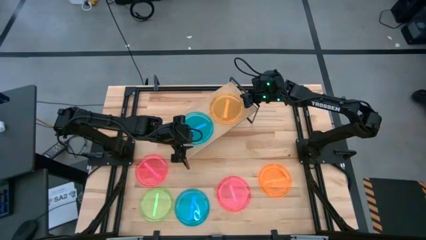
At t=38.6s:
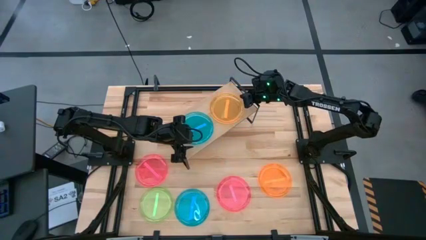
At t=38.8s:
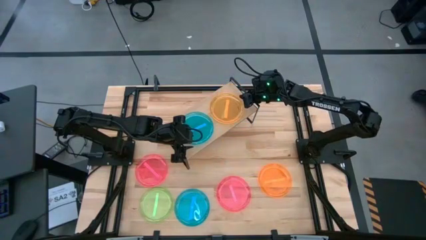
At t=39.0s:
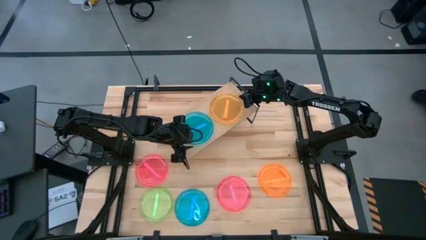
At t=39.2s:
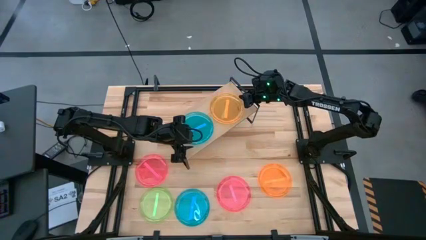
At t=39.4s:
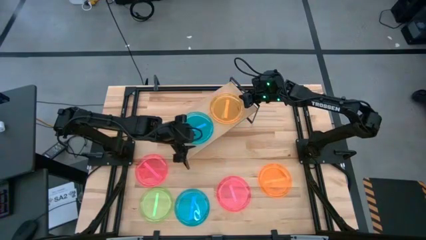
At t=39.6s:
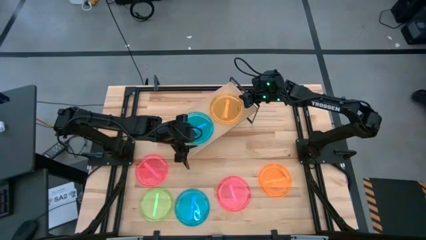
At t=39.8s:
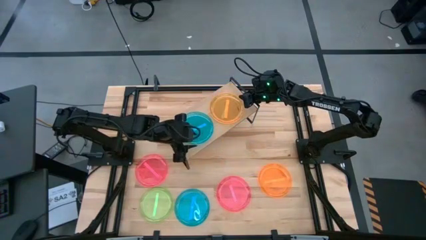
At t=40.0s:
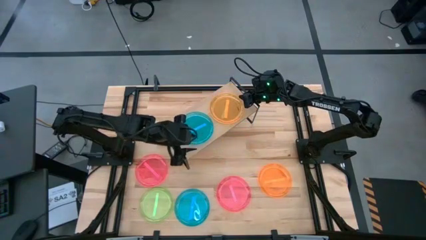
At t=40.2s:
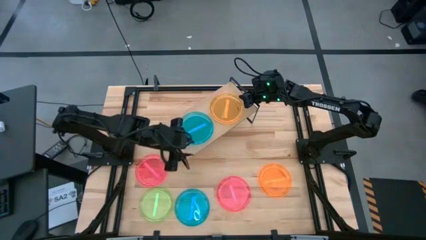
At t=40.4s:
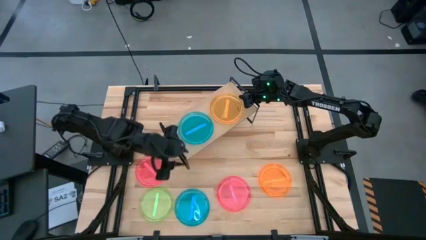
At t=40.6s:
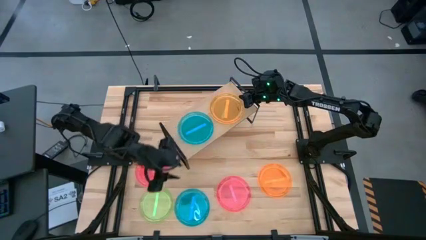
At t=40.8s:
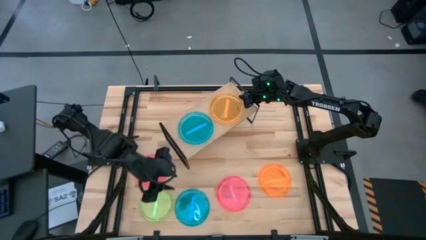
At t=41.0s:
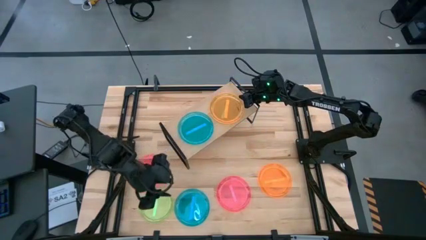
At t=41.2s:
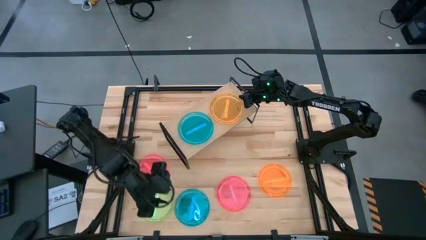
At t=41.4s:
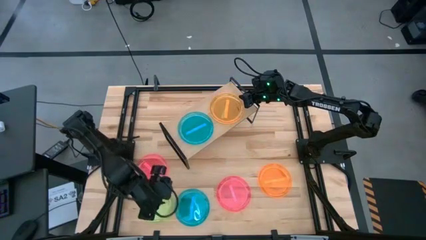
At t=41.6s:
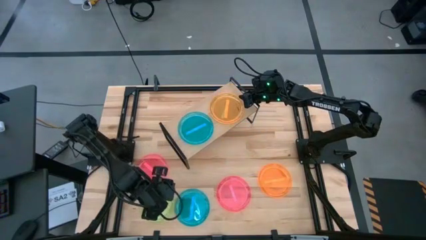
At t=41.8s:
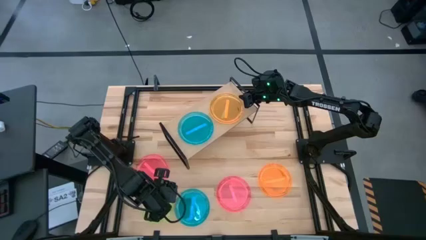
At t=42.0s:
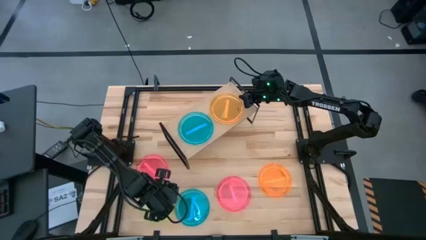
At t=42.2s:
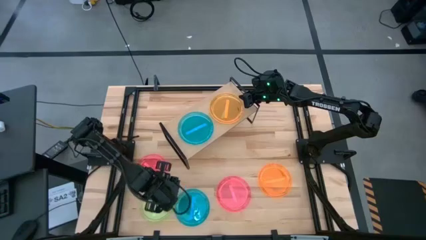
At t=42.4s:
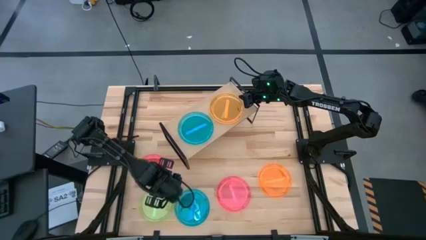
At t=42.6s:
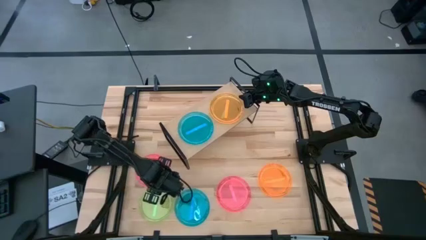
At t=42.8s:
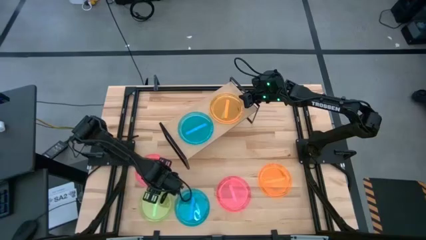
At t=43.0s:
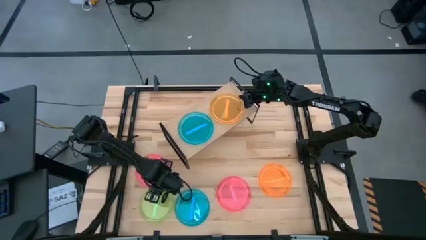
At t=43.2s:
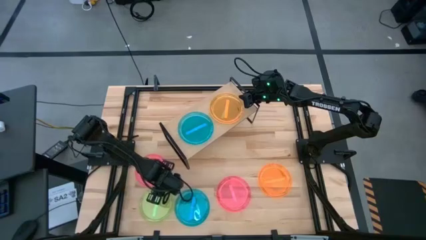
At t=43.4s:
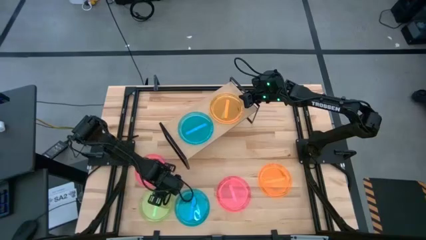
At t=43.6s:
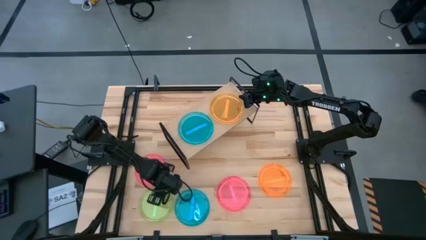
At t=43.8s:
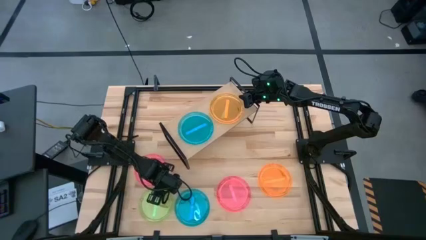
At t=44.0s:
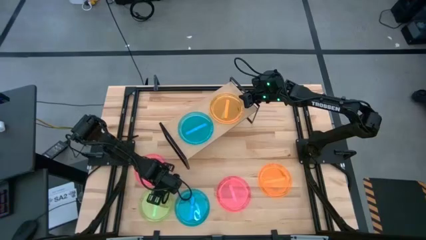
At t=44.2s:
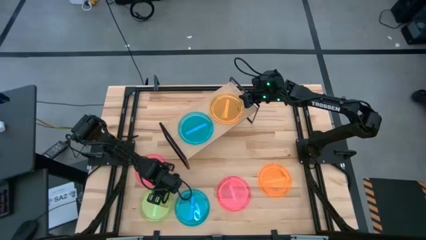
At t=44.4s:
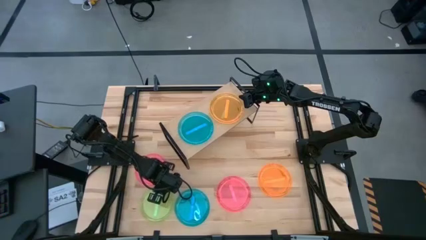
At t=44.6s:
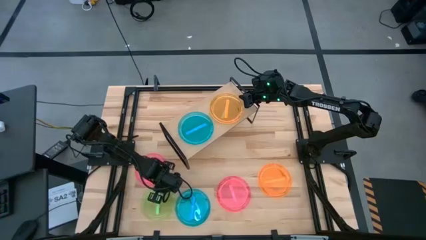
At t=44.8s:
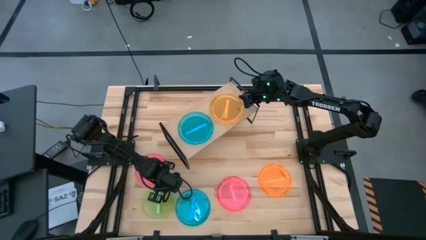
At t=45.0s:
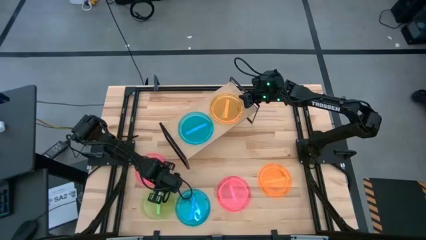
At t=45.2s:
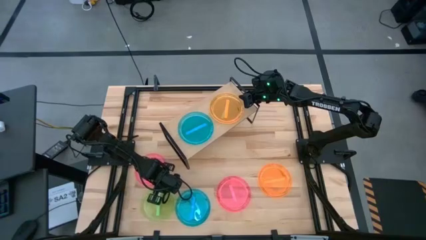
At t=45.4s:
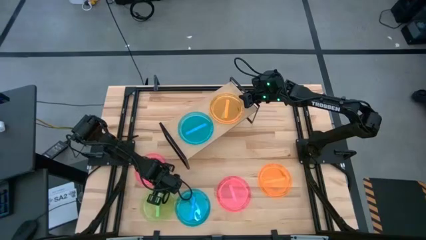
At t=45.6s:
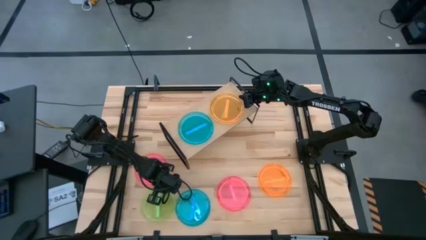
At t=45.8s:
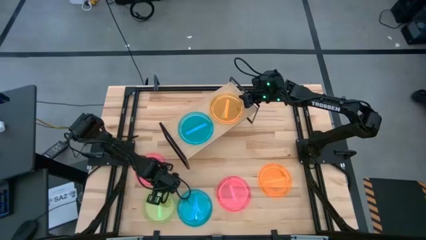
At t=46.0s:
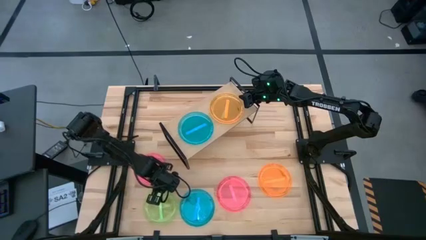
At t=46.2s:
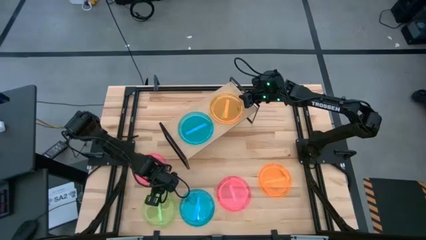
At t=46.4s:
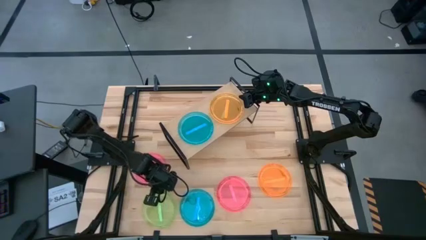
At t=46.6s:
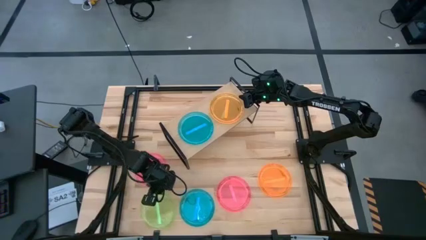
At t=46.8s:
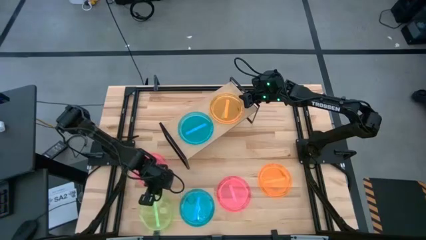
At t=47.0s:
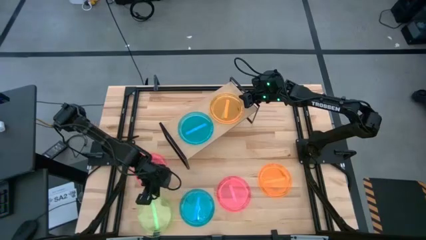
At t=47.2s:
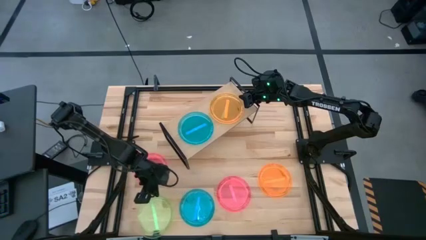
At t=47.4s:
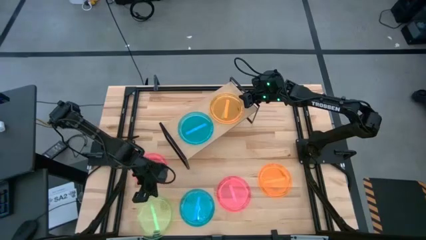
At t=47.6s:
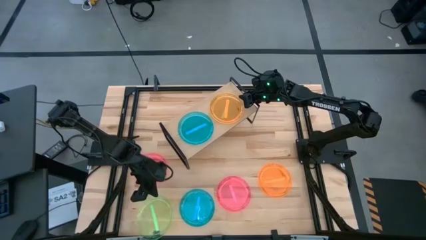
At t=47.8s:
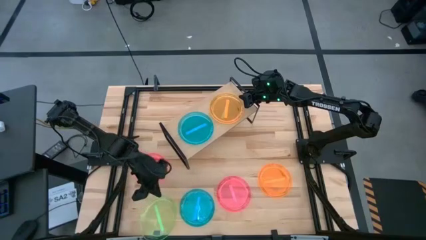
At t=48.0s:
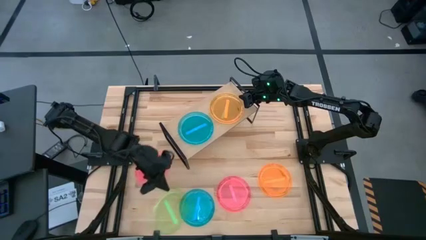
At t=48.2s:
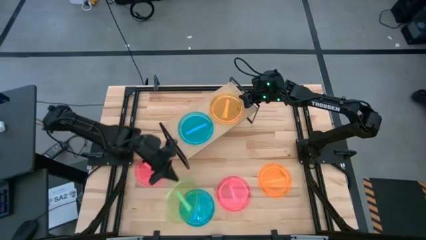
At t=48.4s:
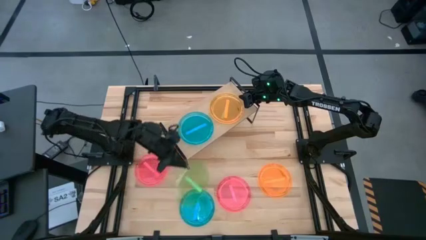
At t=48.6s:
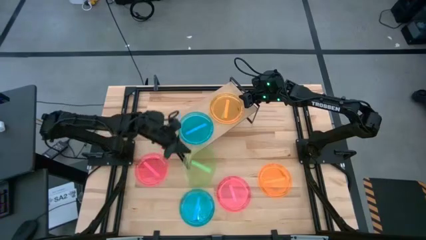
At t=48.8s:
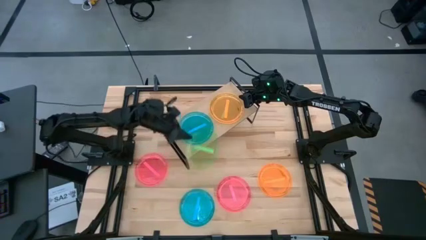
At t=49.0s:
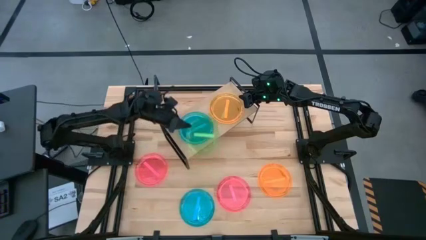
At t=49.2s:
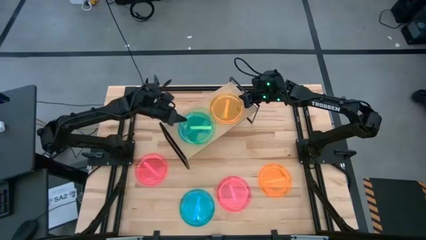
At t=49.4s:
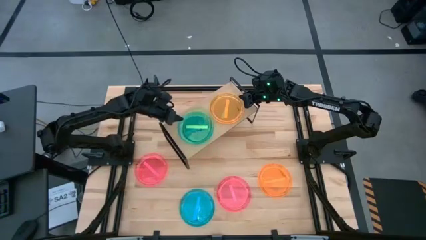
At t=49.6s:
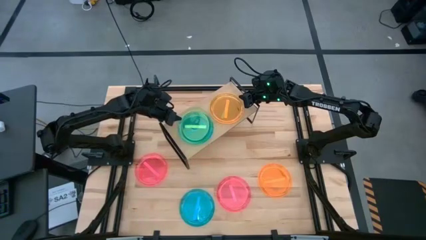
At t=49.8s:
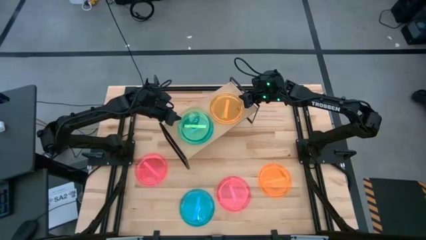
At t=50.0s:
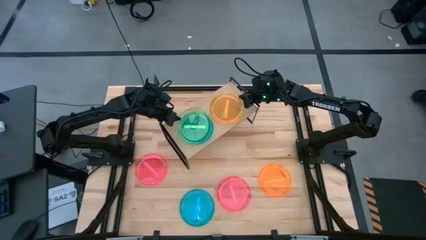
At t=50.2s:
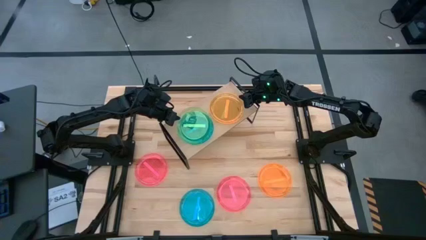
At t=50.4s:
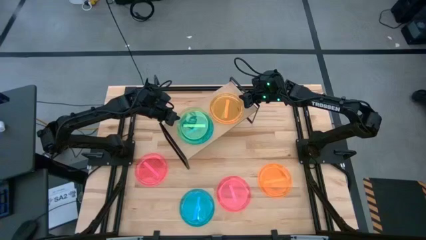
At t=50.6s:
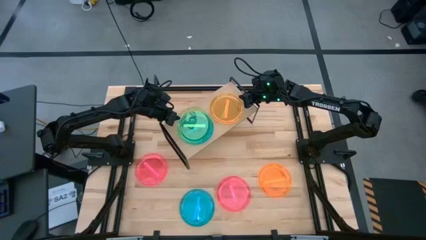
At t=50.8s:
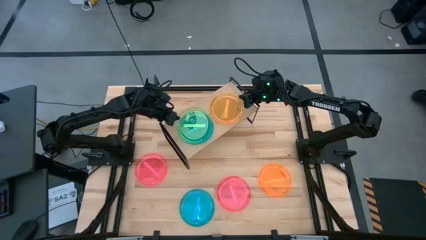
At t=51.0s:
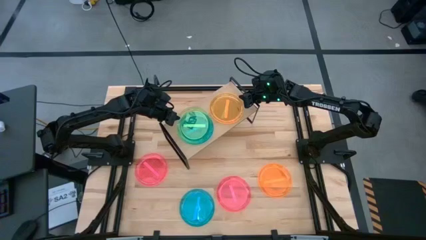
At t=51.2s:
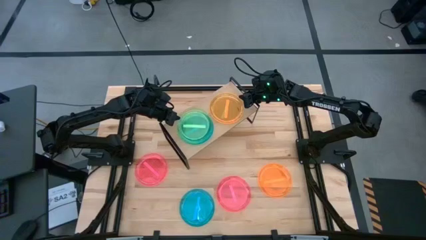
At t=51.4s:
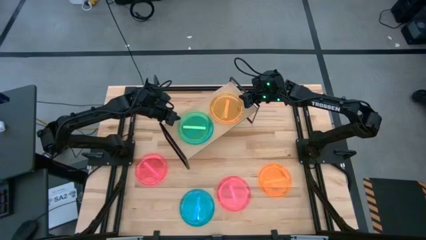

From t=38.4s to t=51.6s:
Task: Place and stack plates onto a shelf
Stack the green plate on the blue plate on the shelf
